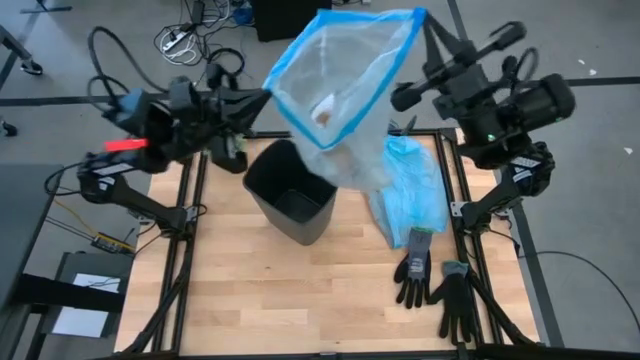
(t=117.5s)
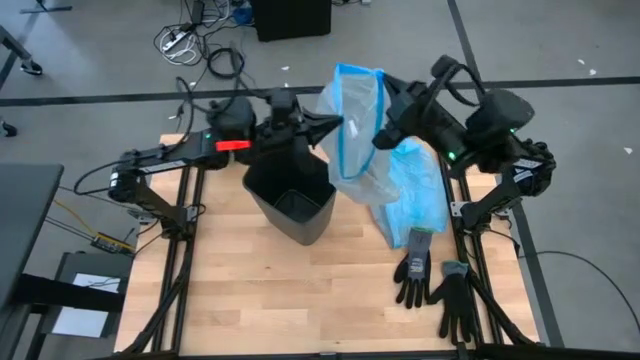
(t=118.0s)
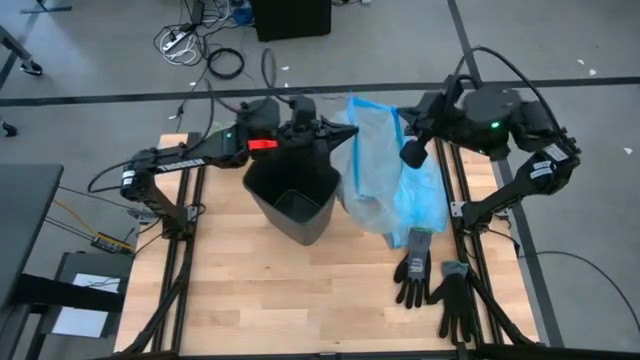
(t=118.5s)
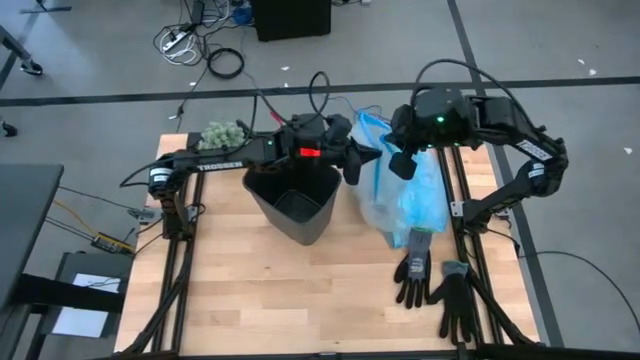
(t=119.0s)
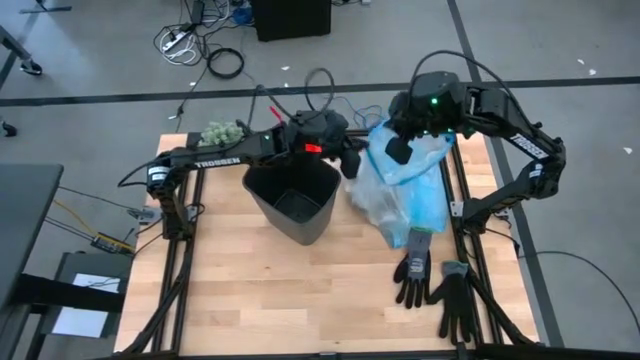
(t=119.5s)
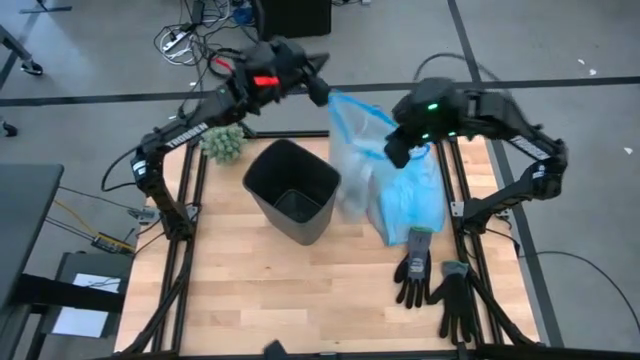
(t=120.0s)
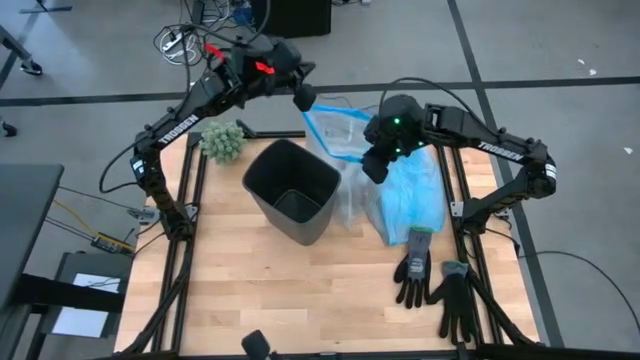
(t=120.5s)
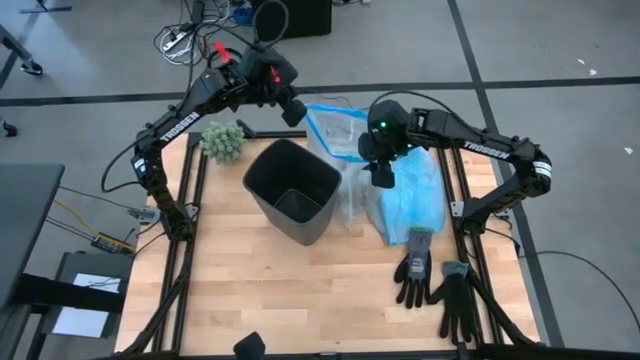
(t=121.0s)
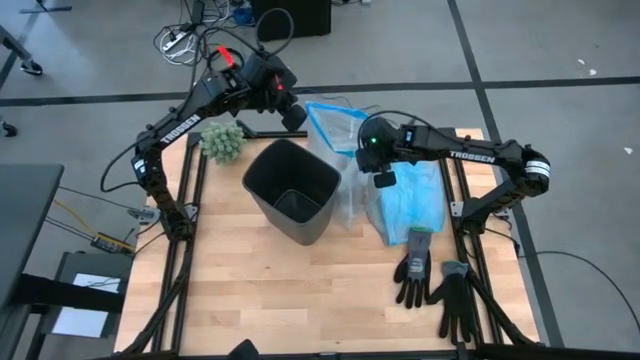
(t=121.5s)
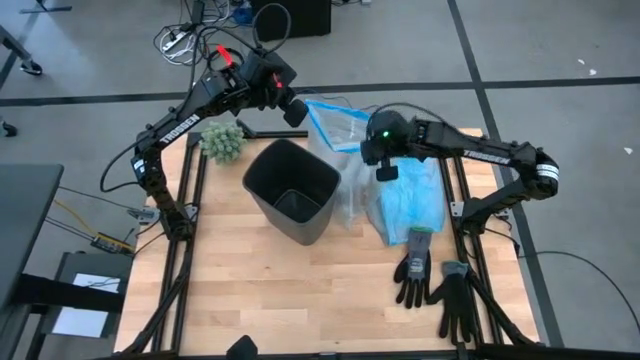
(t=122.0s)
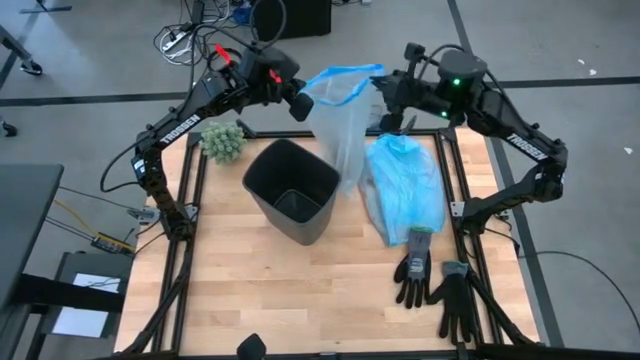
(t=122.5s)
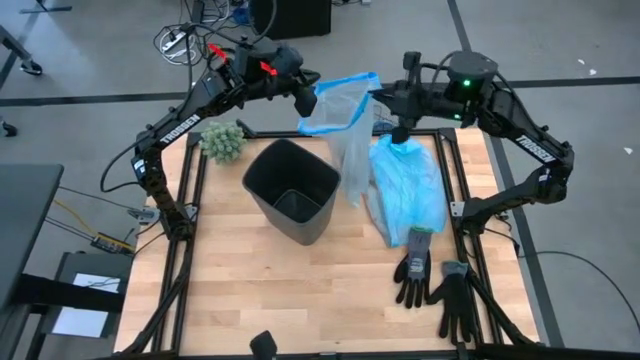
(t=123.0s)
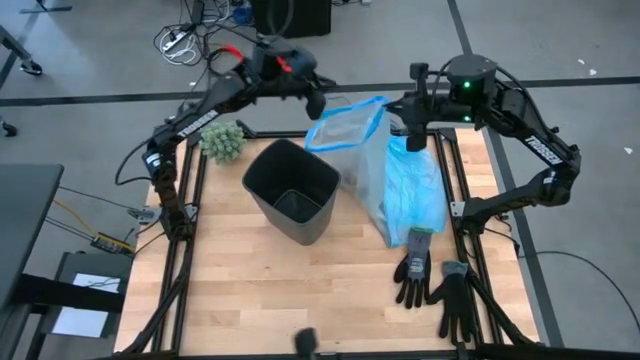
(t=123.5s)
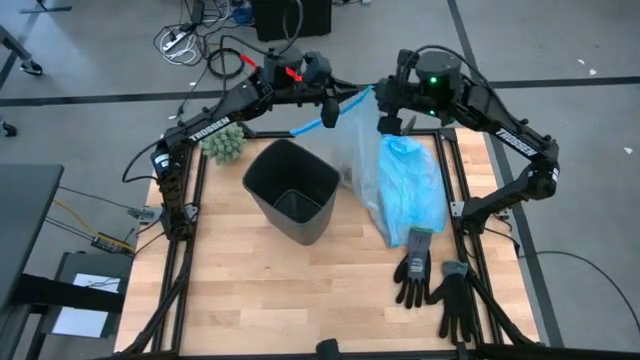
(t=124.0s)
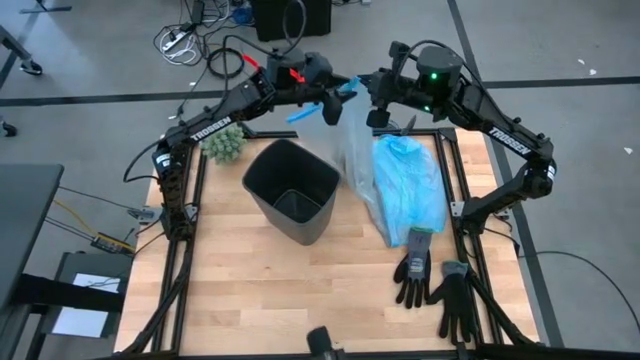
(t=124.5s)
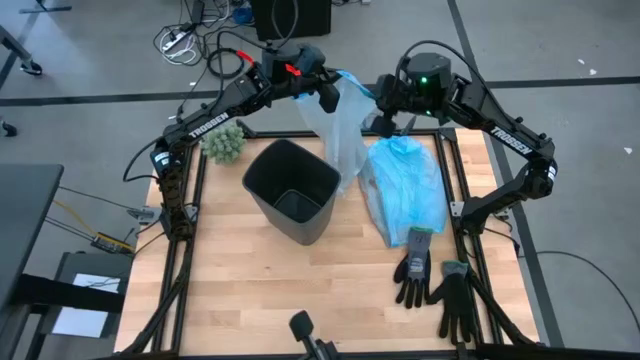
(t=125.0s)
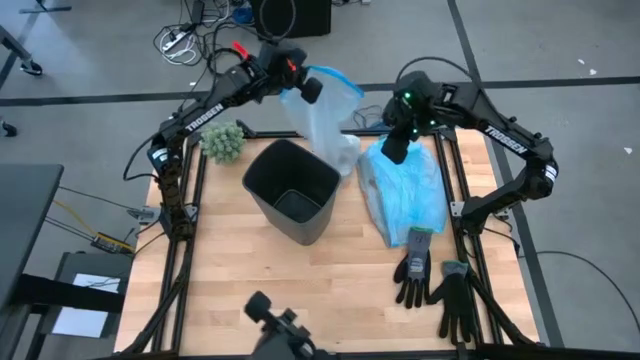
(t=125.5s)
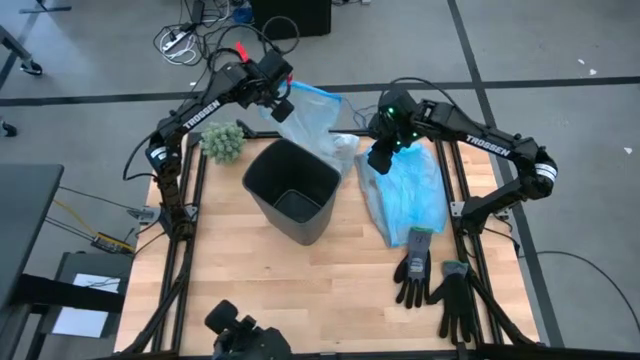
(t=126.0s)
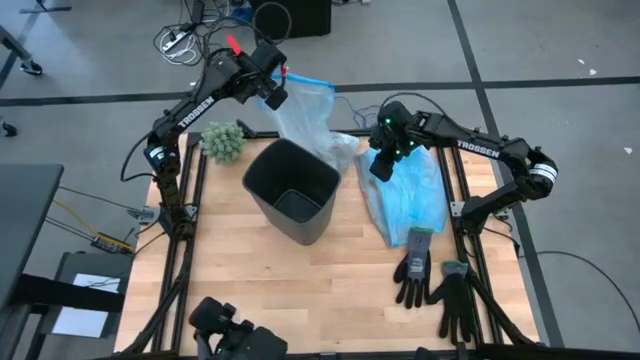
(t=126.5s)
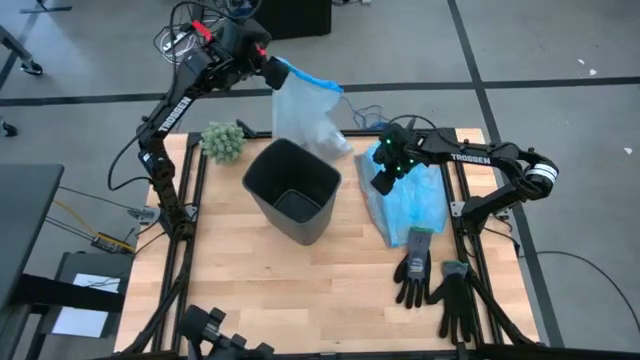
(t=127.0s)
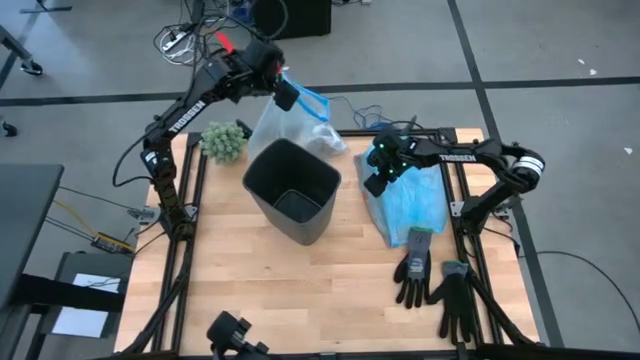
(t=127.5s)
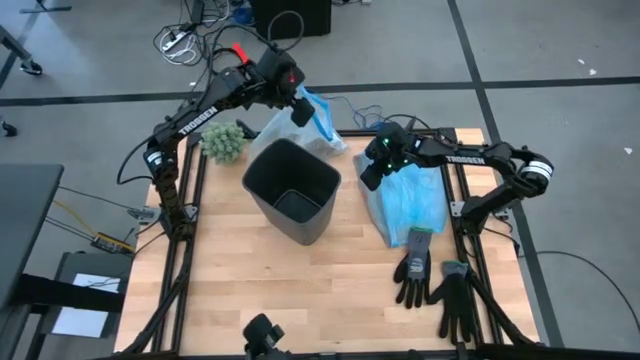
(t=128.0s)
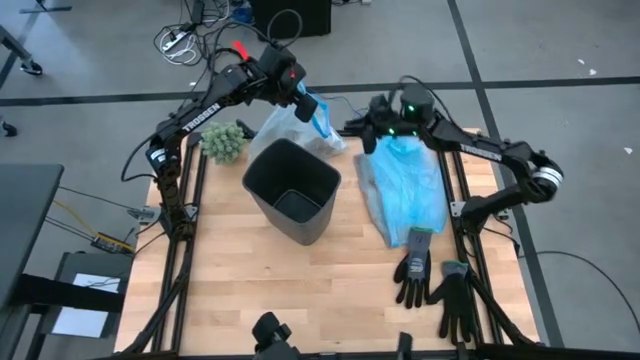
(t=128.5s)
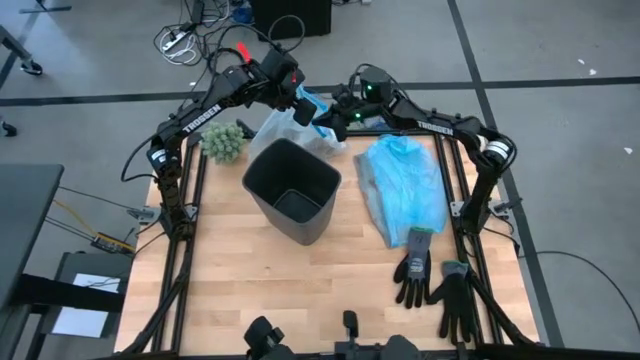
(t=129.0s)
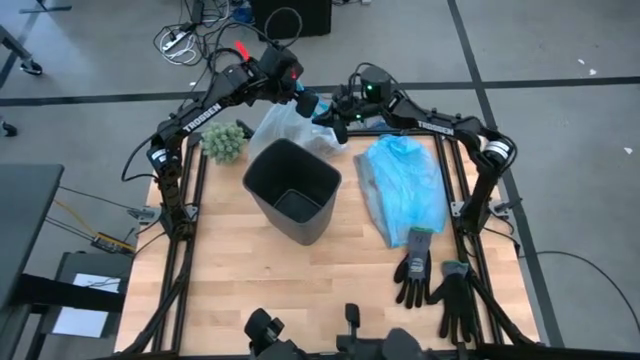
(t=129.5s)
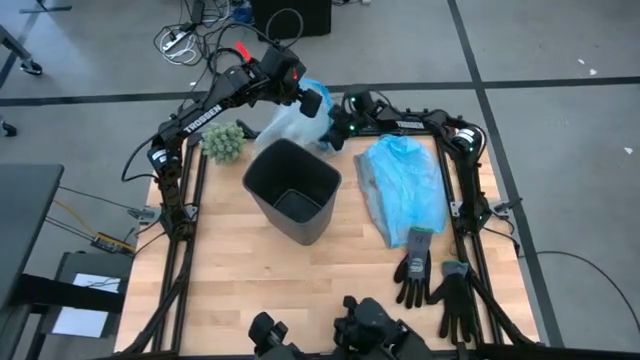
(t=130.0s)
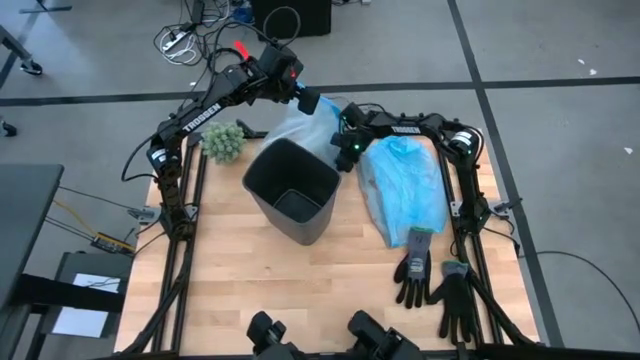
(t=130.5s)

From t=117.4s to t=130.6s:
Task: place trash/remove bag and relplace
Remove the trash bag from the bin
